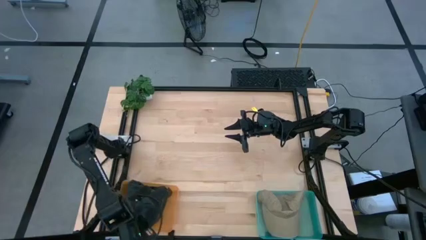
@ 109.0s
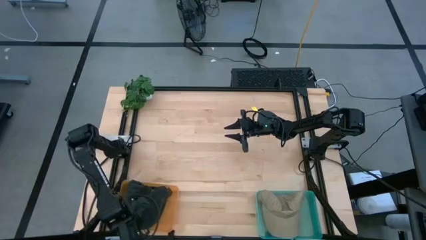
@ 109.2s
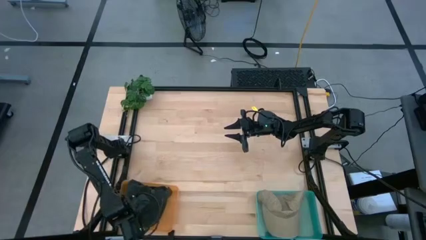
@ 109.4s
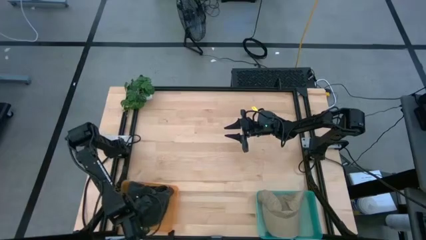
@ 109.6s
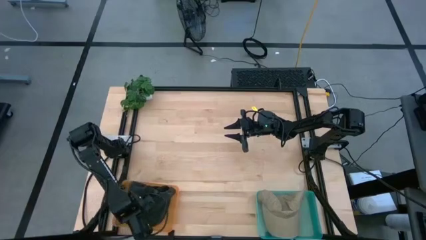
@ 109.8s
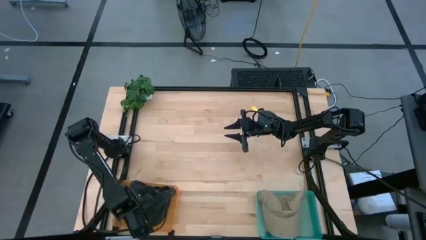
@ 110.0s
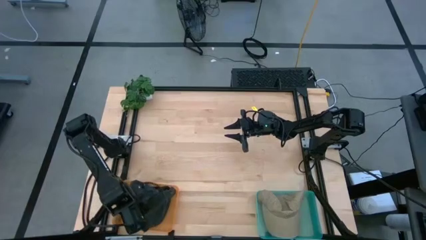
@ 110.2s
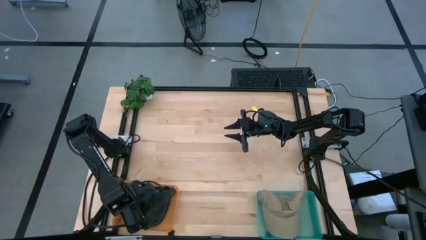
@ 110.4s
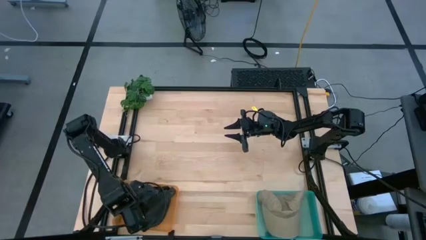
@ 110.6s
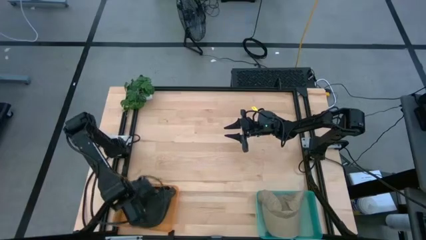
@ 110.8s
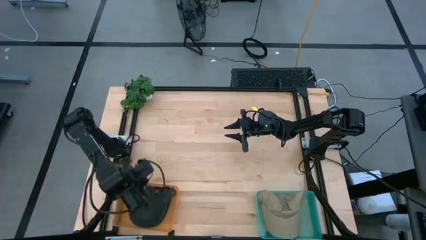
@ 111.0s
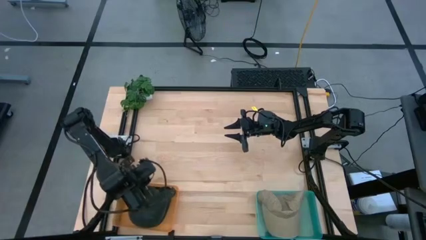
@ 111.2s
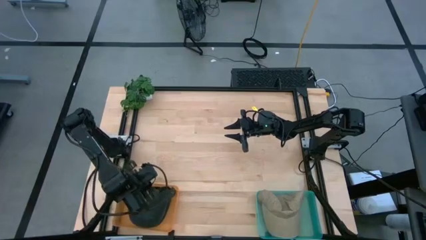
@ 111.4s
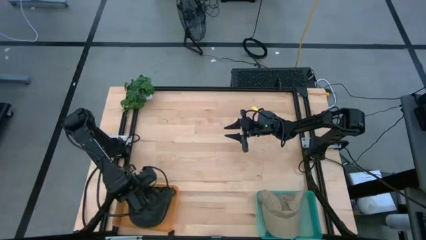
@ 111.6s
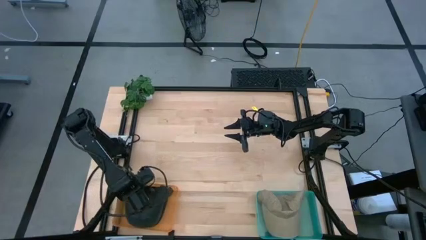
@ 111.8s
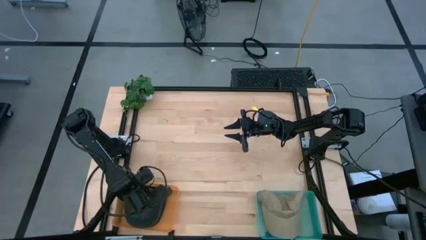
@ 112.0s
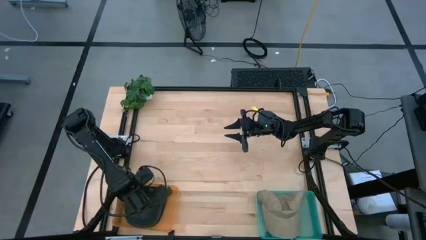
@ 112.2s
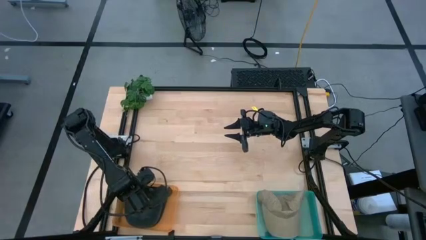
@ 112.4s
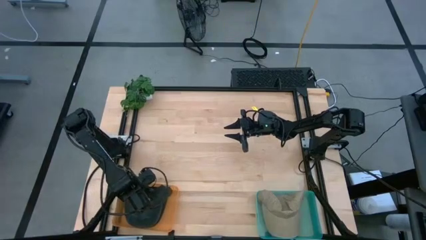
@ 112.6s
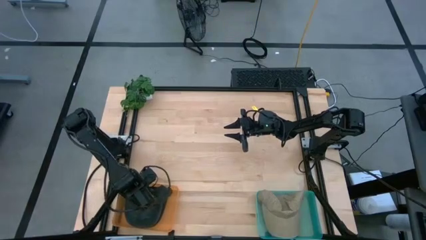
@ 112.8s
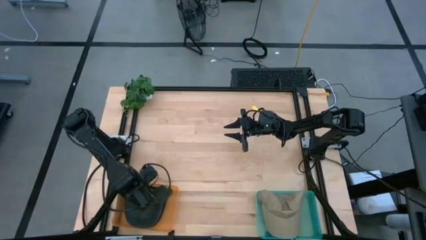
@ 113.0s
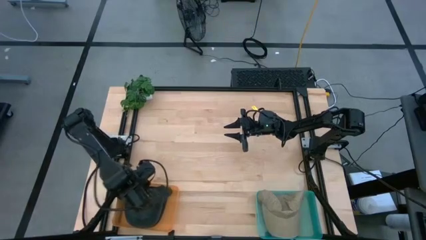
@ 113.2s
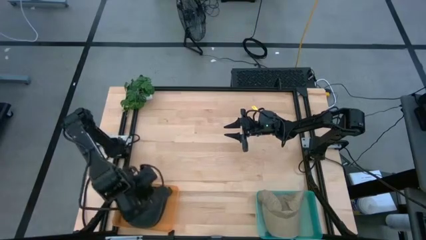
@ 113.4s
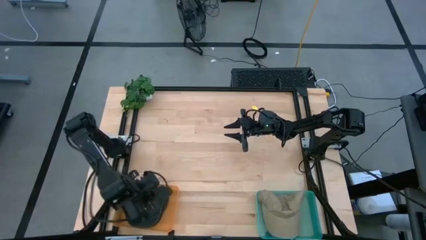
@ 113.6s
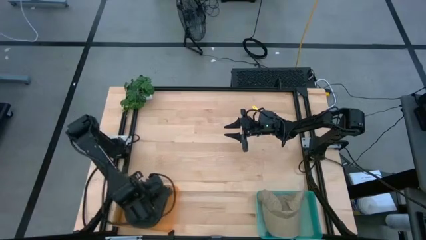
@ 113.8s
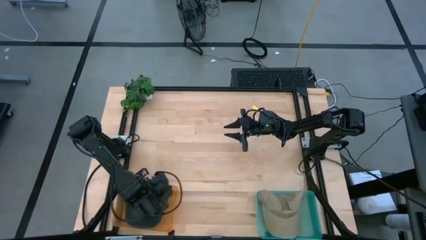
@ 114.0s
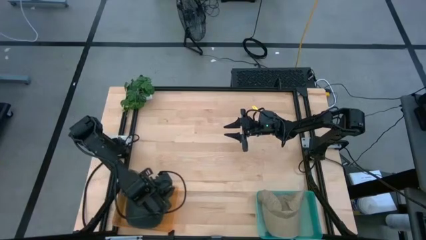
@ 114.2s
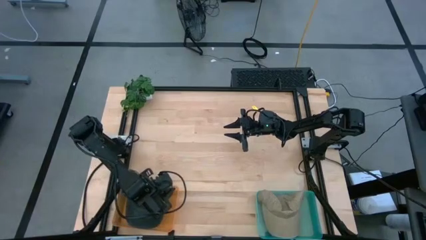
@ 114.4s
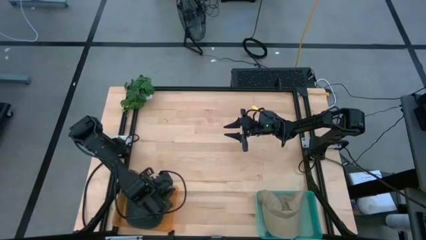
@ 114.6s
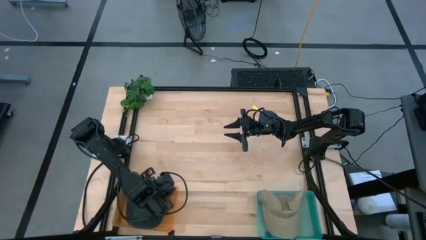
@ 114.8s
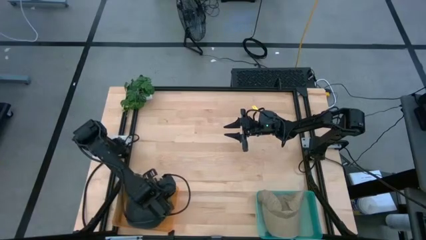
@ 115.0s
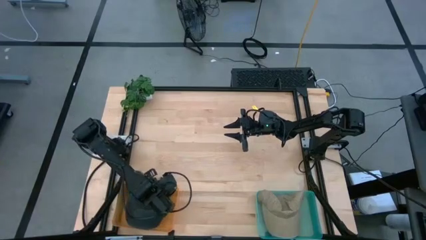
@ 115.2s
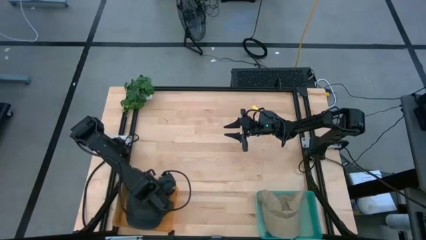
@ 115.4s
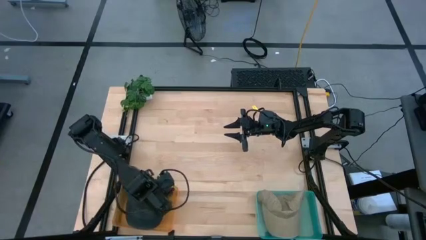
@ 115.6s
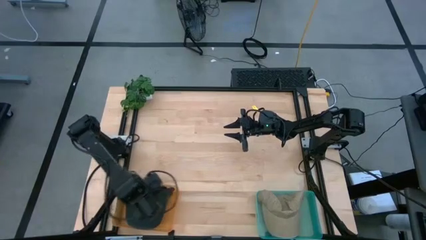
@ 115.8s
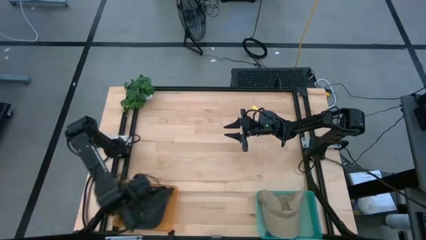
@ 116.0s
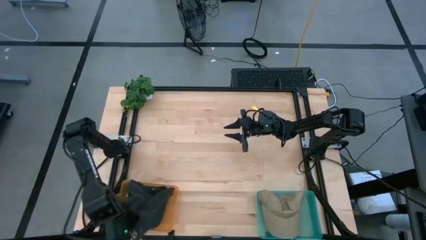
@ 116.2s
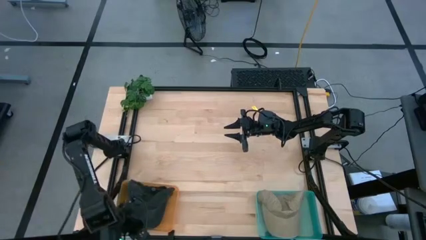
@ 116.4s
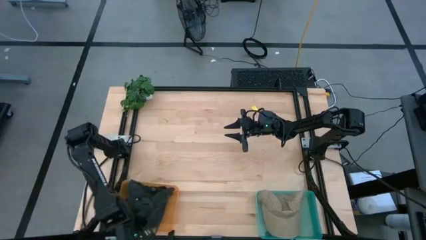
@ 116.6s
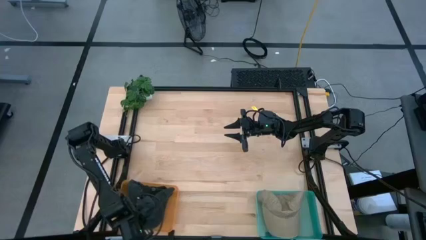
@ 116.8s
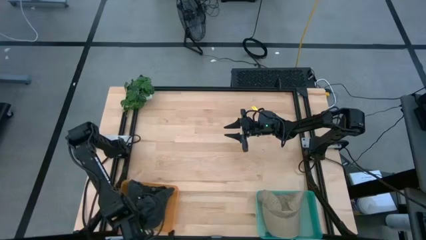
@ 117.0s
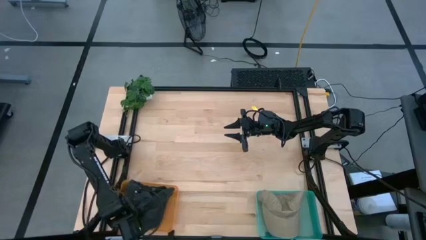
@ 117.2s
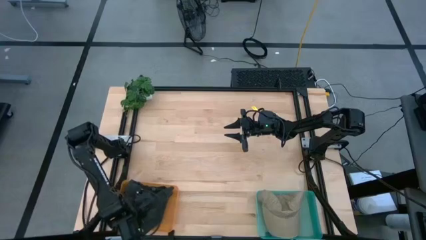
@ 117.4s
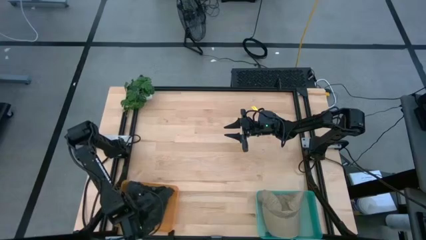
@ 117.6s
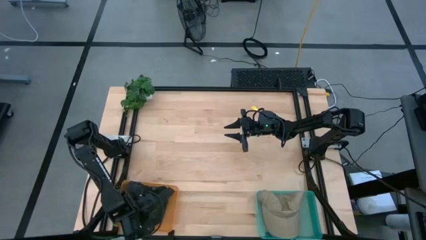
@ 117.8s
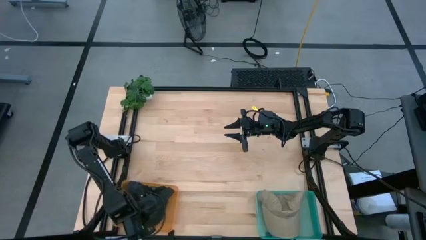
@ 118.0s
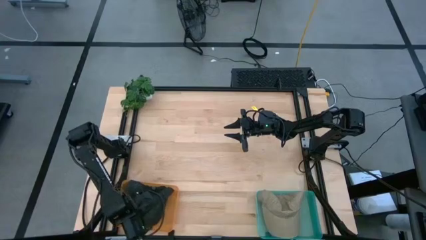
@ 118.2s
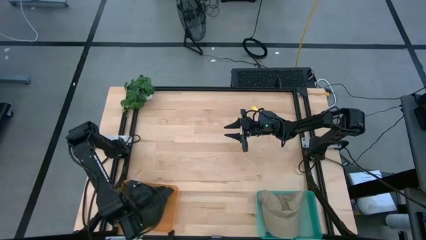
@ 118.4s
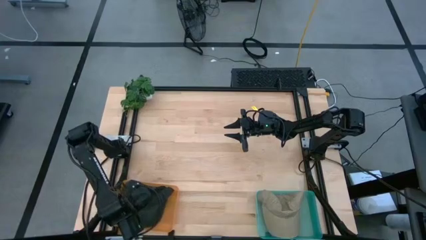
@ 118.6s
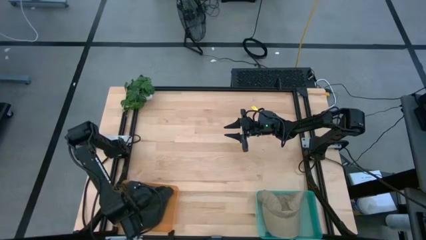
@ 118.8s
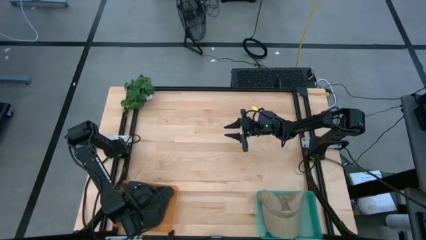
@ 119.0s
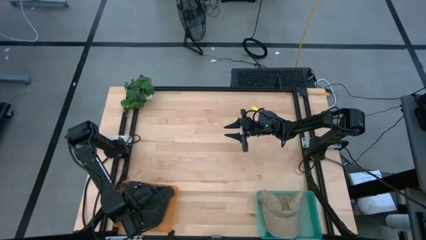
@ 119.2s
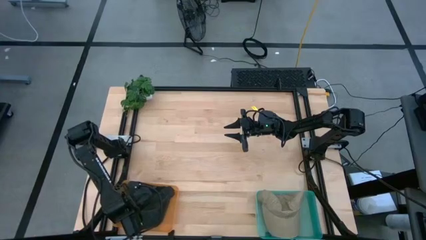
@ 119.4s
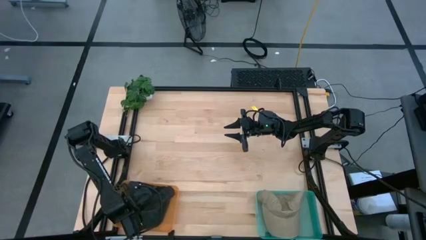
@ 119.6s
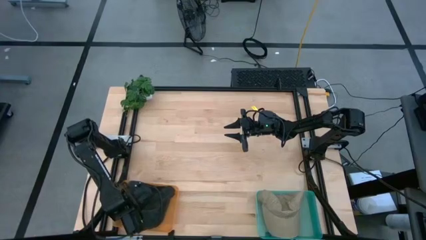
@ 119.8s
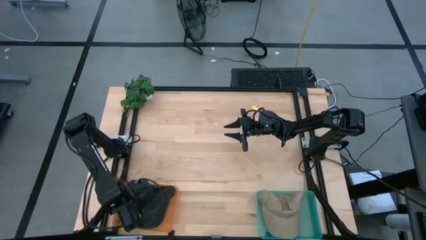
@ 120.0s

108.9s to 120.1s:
Task: Pick & Place hat
Put the black cap into the orange bin

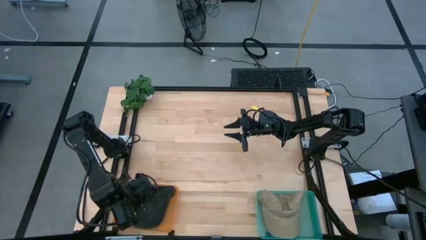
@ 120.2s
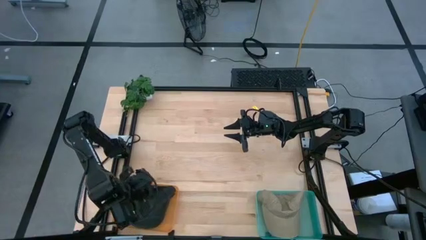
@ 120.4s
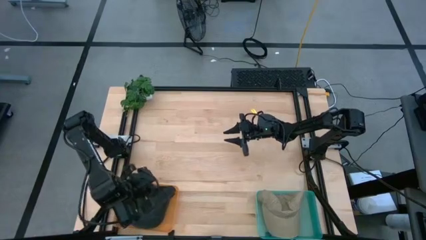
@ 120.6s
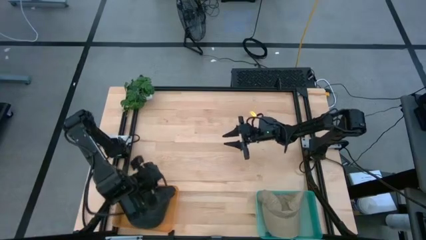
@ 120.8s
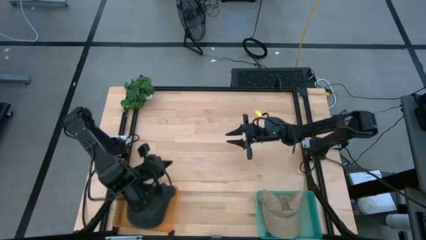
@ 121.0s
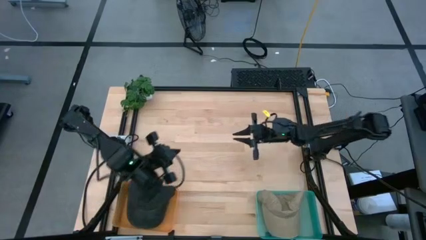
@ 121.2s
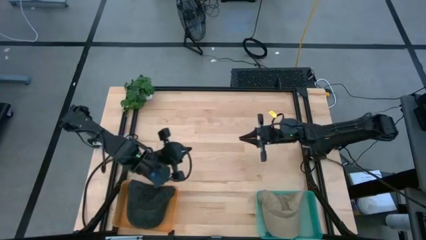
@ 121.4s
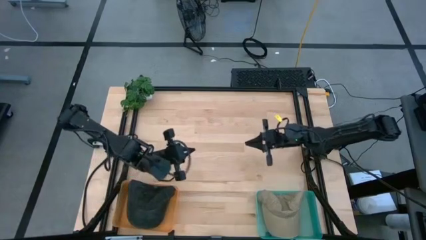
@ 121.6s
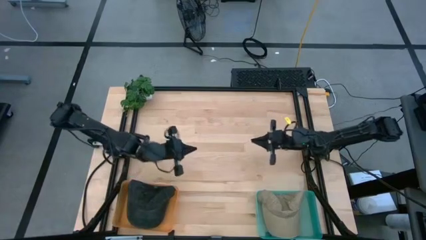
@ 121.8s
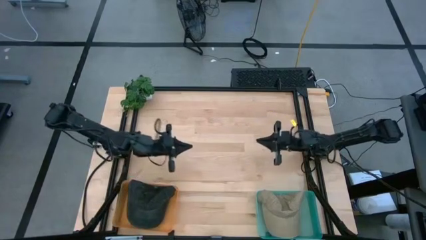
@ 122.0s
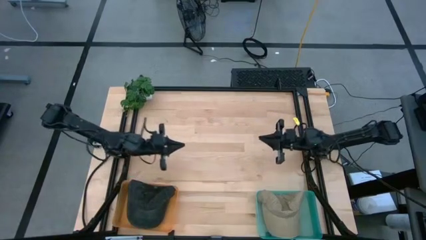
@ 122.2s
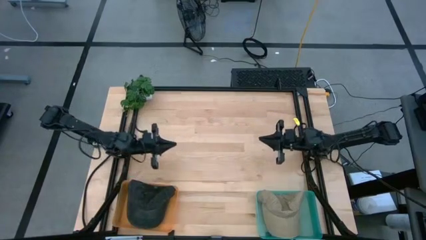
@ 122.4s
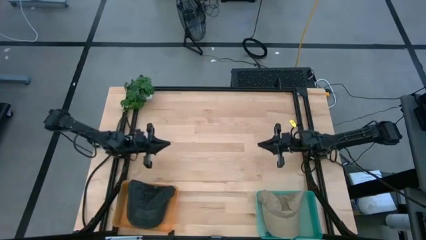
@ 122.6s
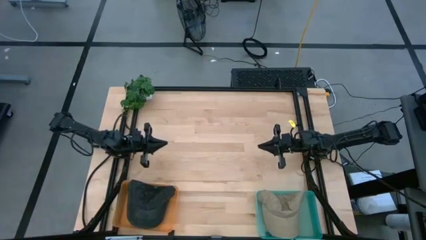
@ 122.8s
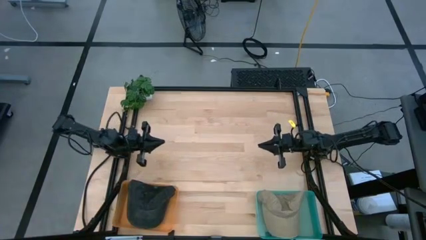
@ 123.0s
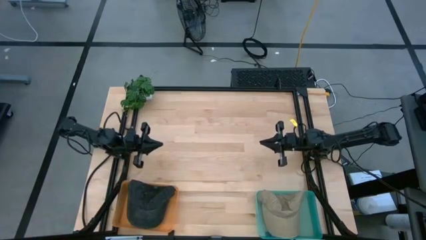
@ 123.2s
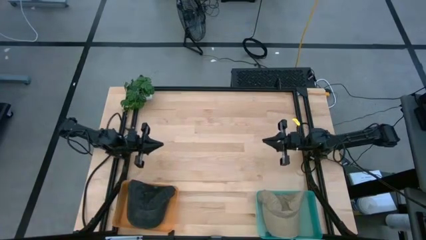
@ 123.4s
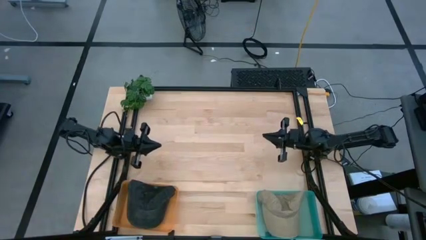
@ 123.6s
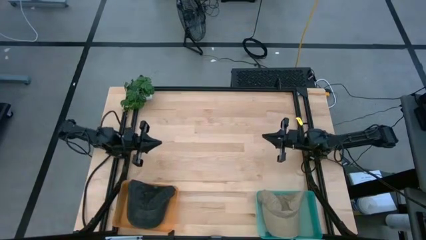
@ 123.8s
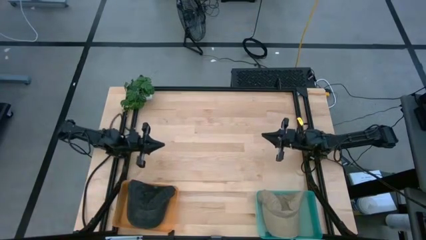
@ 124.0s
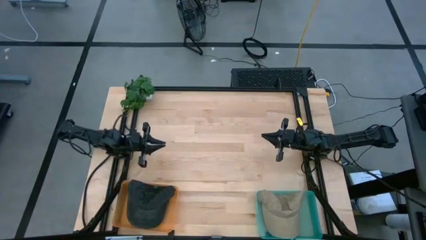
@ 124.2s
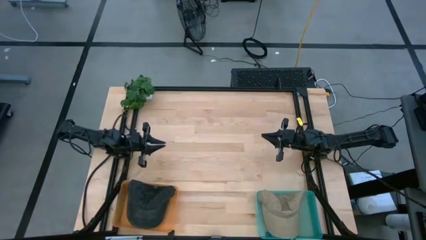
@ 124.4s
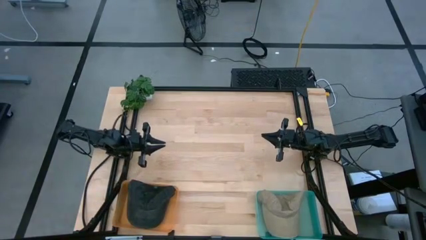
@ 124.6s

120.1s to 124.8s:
Return to Home Position

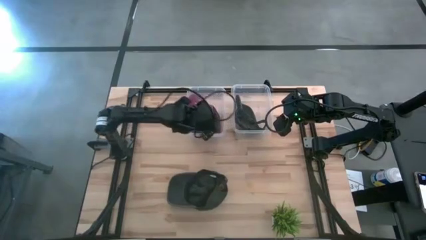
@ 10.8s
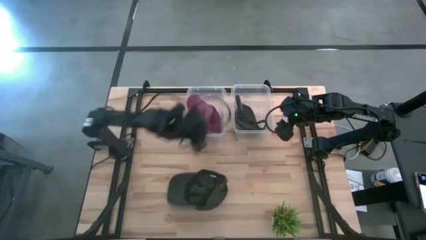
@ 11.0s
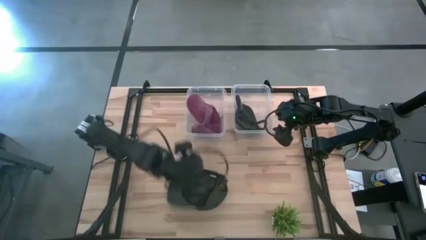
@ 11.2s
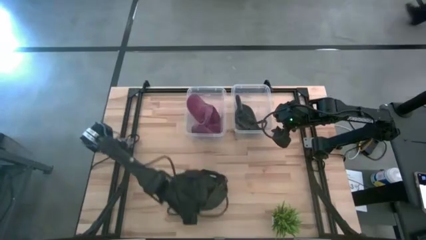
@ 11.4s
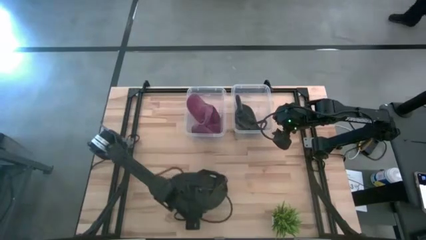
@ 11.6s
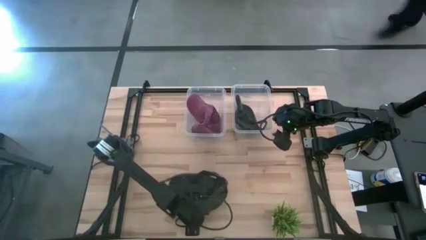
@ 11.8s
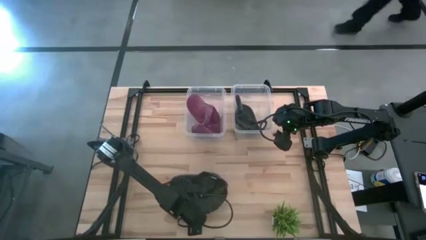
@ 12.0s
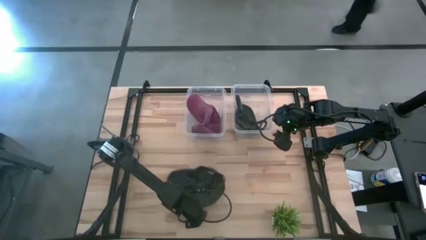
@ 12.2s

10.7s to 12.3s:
Task: Pick & Place hat
Put the dark gray cap into the right transparent bin
